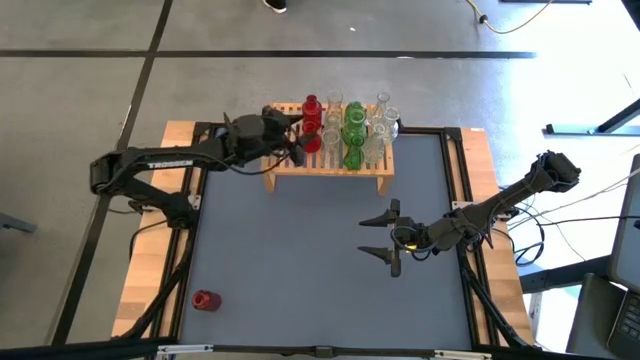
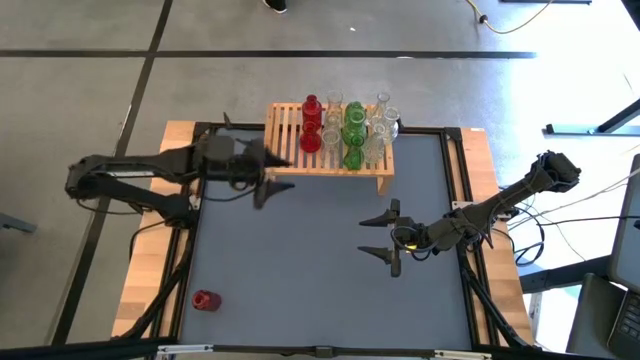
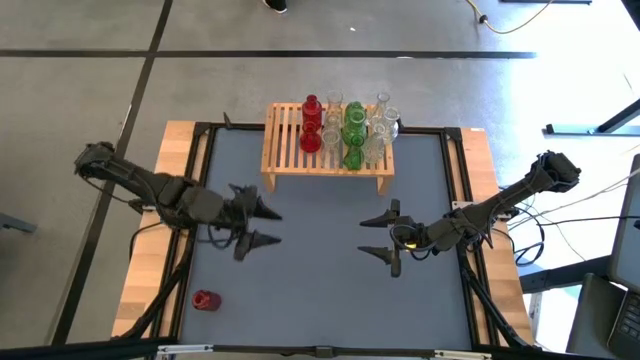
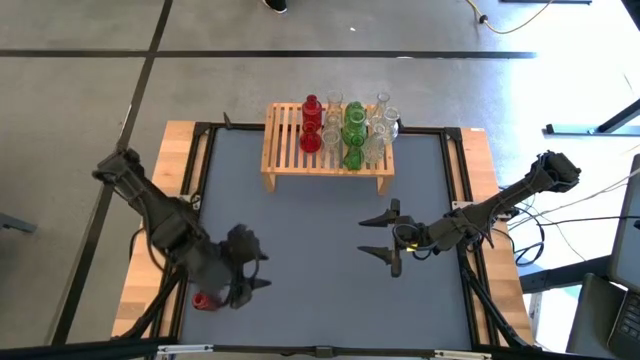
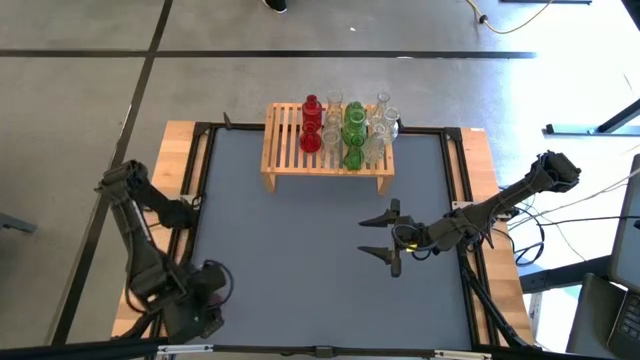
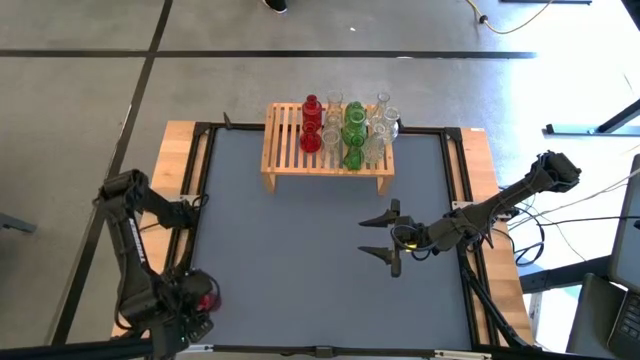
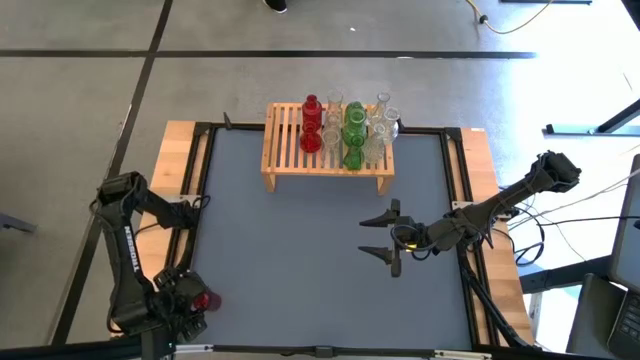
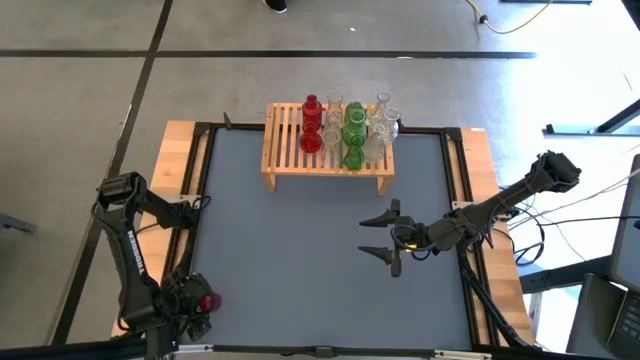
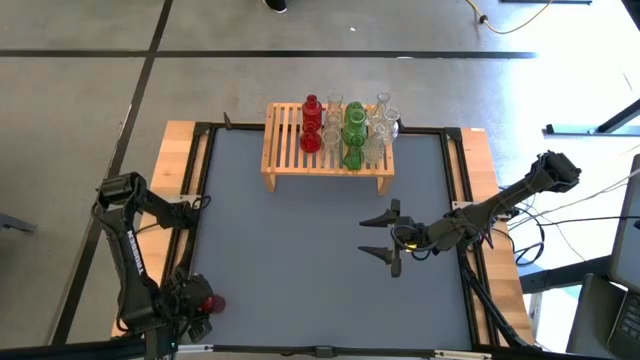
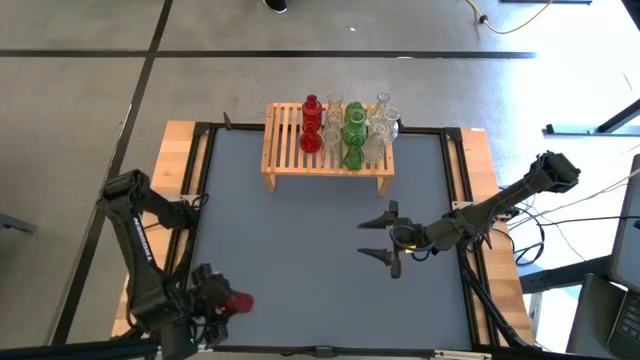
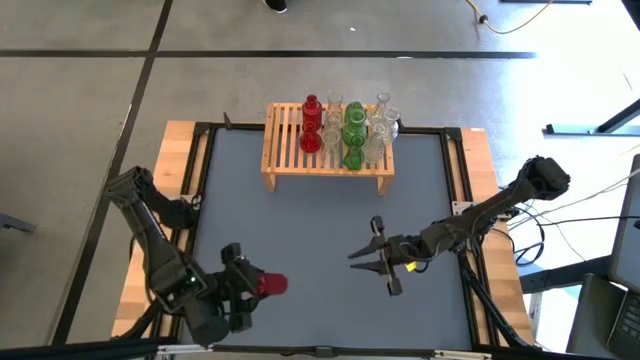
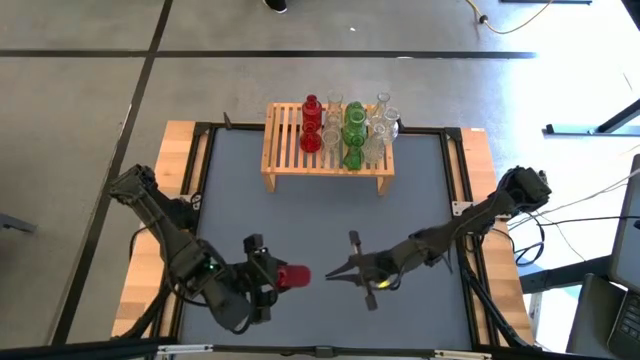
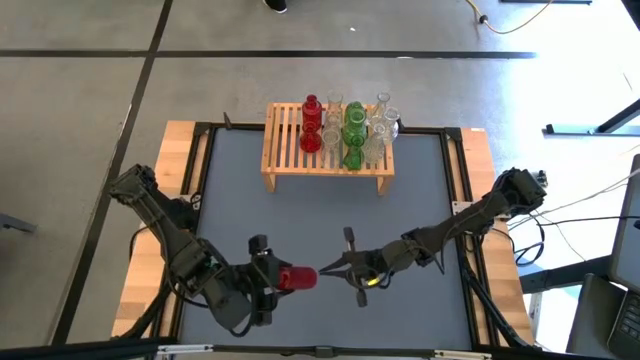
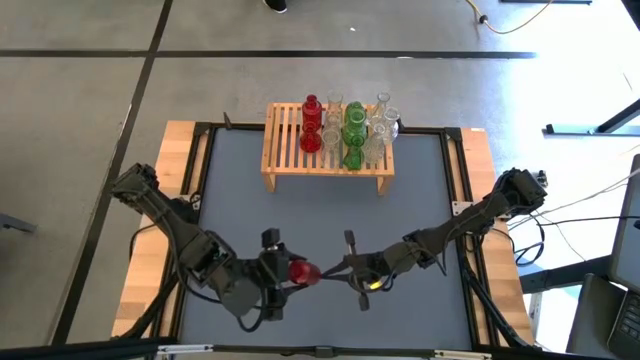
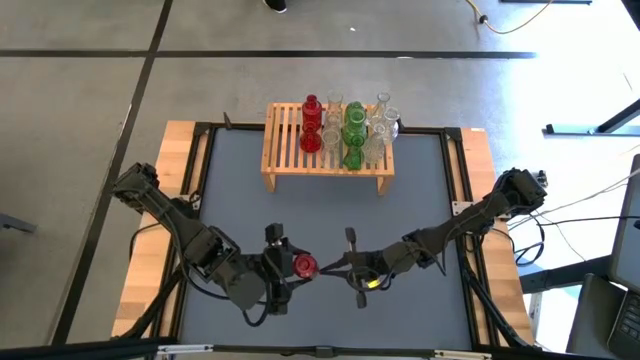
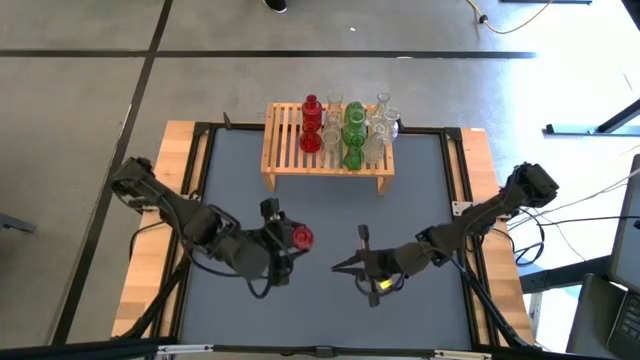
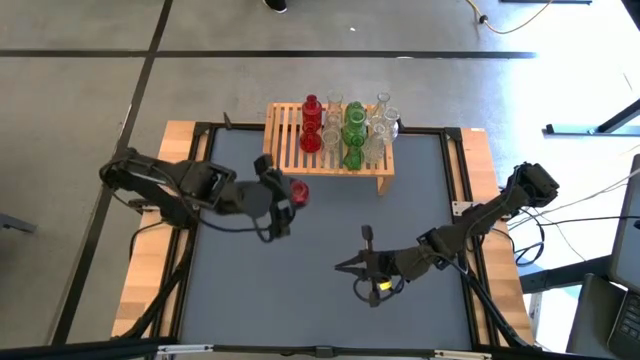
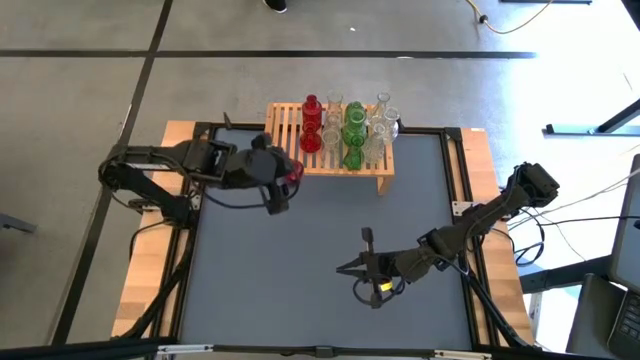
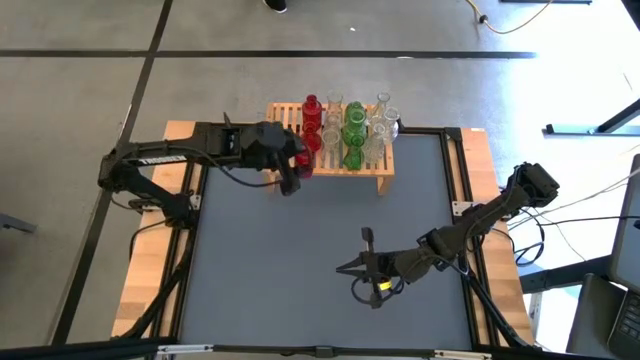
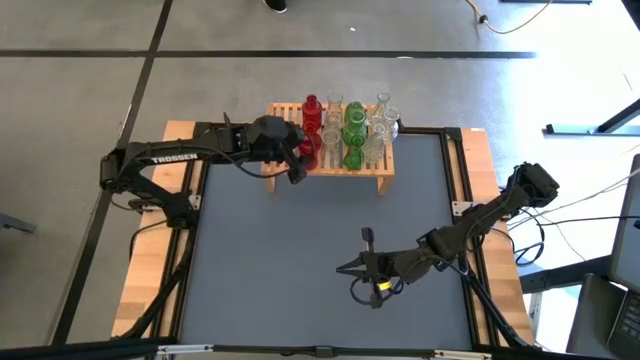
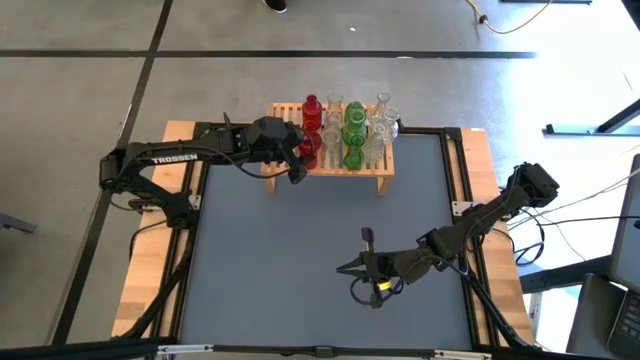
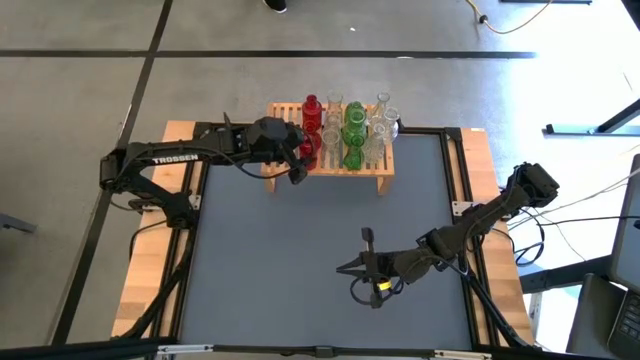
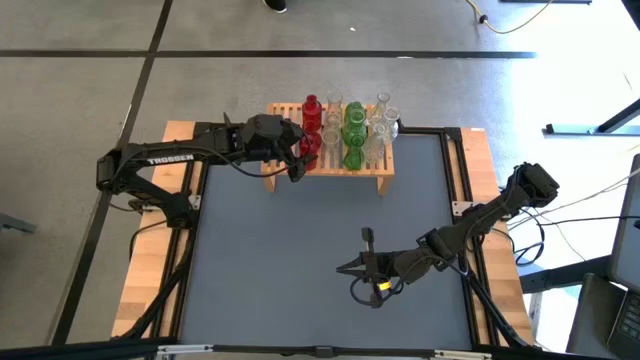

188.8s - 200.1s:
Task: sort vases onto shelf
Put the red vase on the shelf aligned with the other red vase

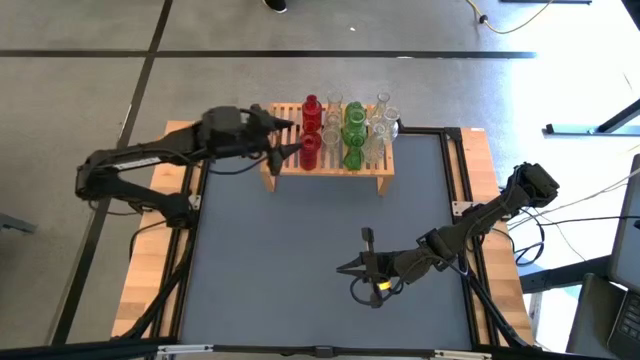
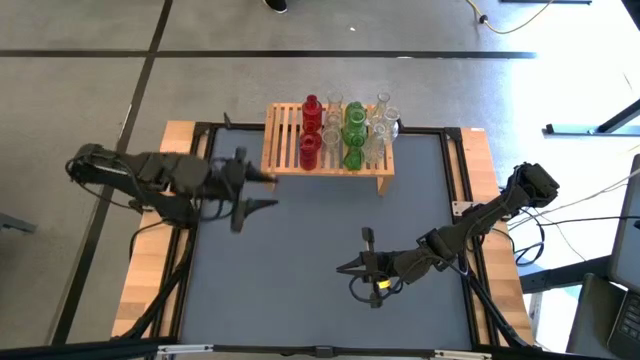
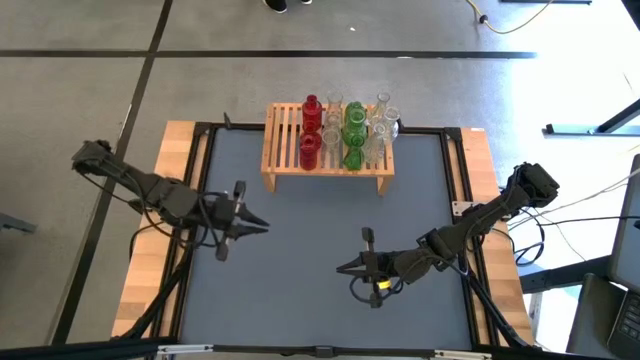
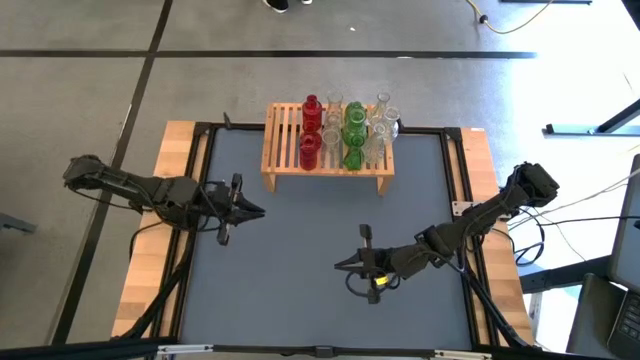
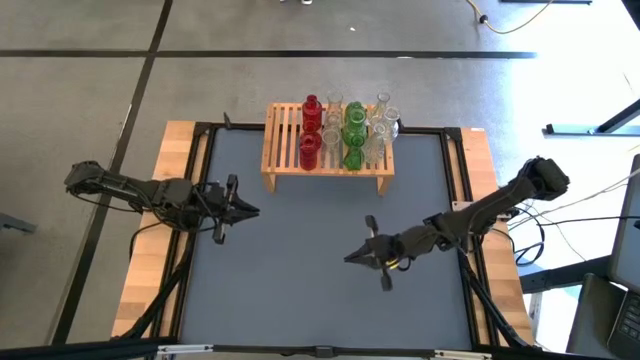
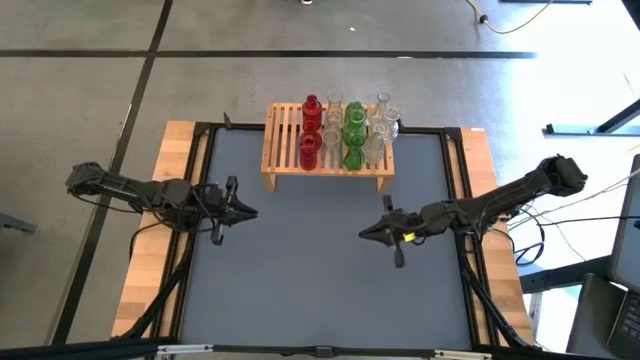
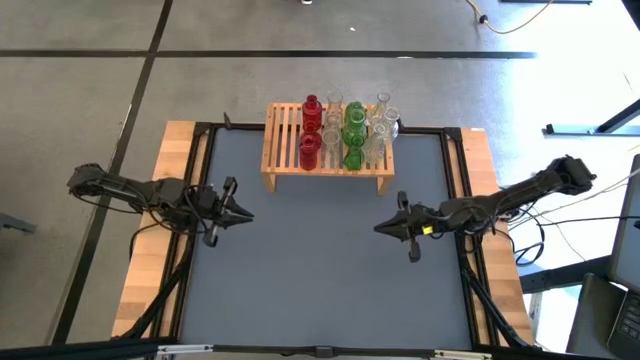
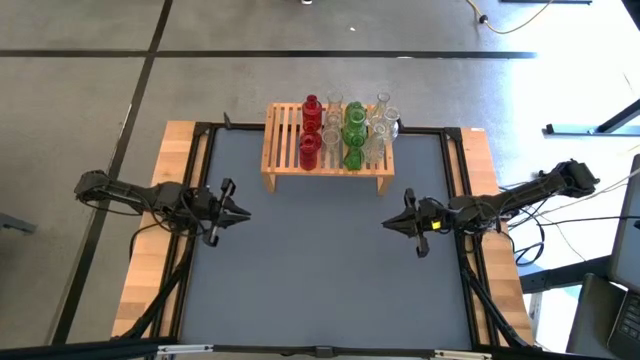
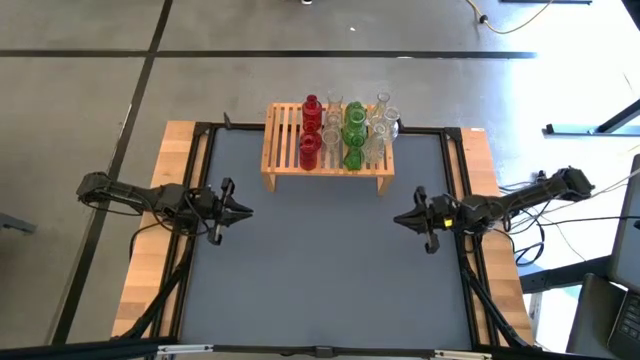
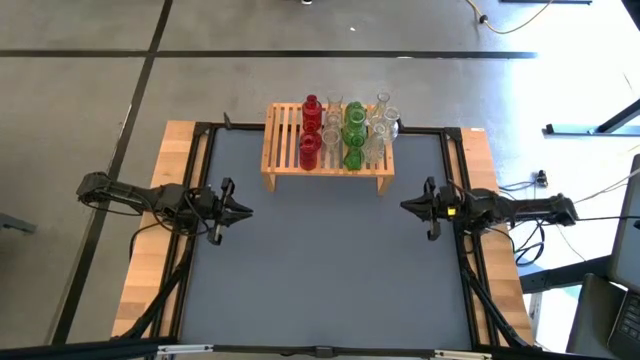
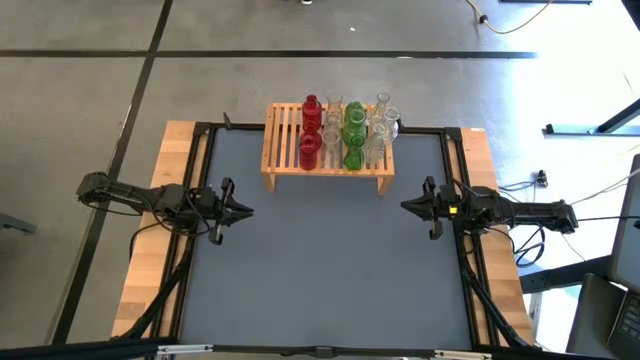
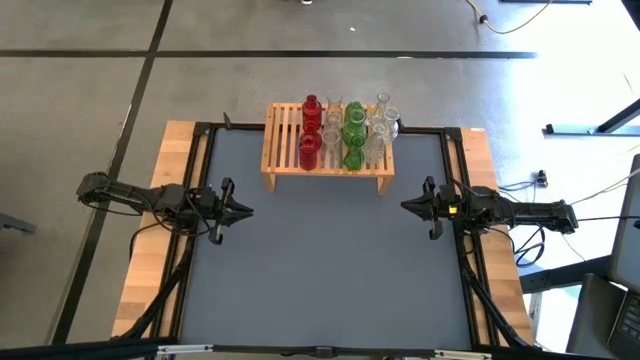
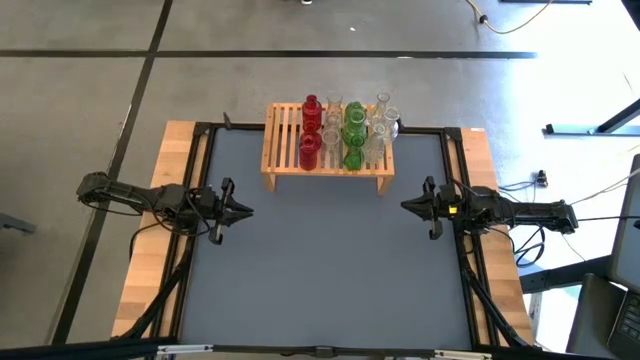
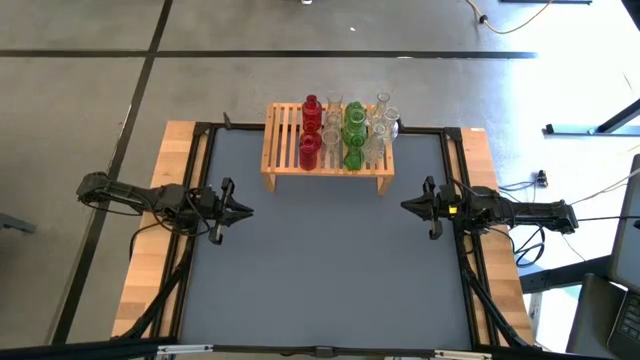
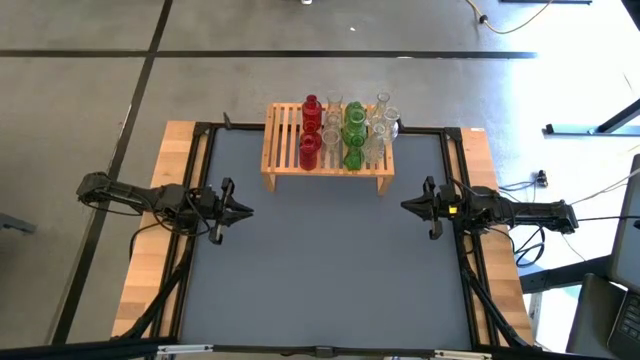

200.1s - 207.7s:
Return to Home Position

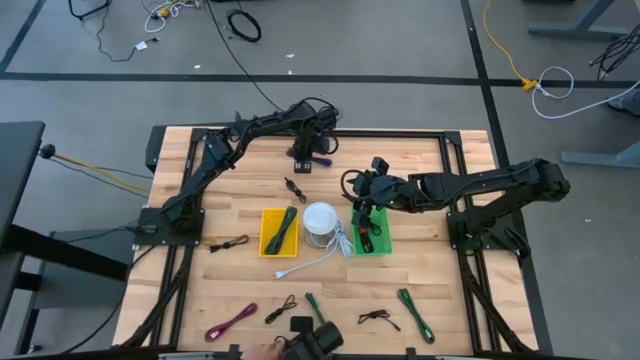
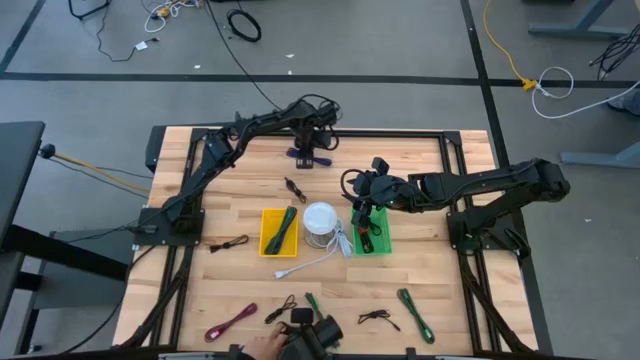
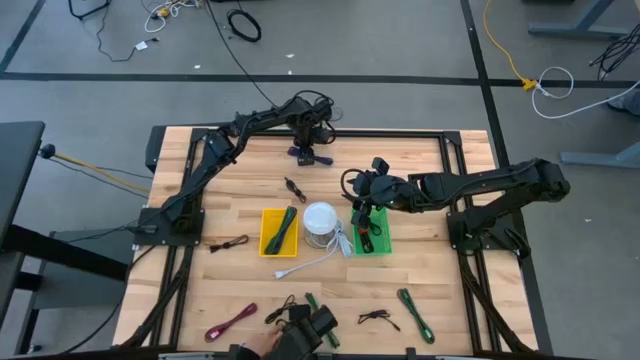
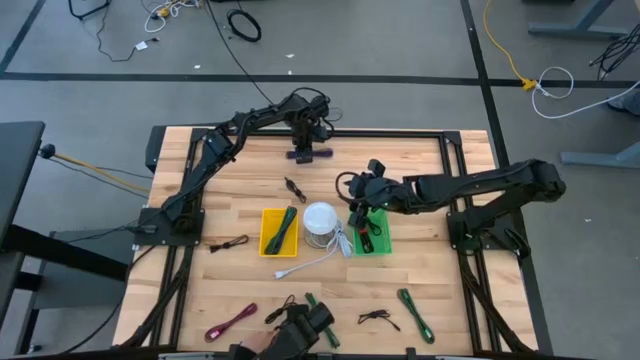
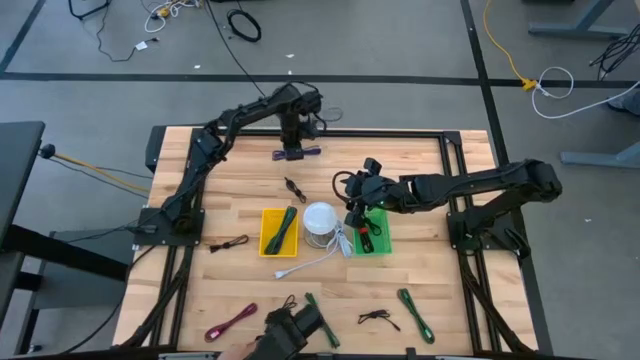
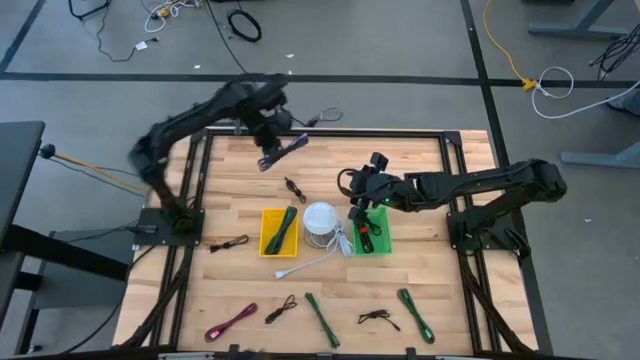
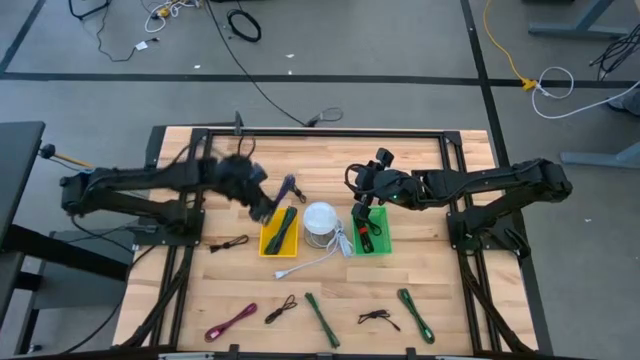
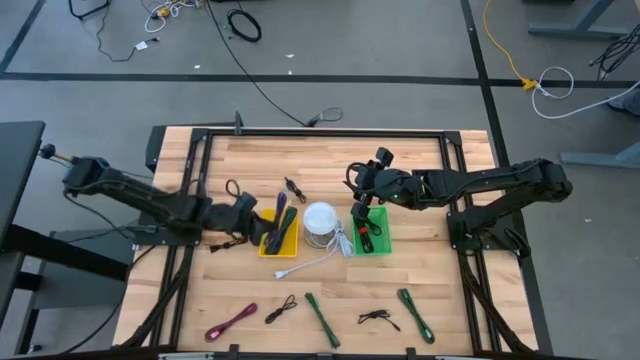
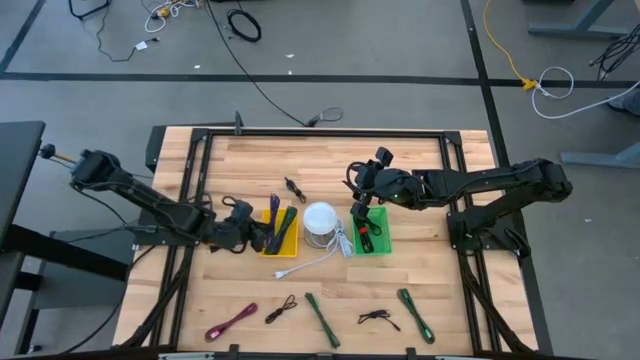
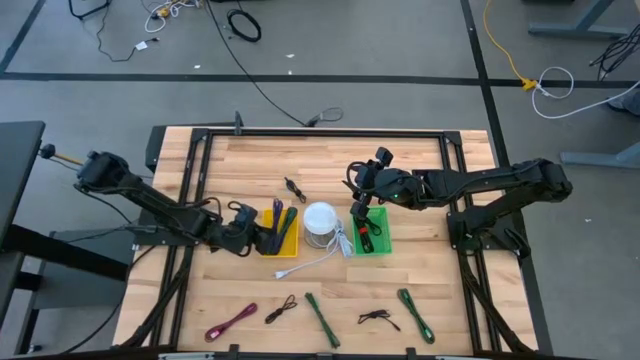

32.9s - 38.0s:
Task: Pick & Place USB Port
Put the black blue charger cable into the yellow basket
